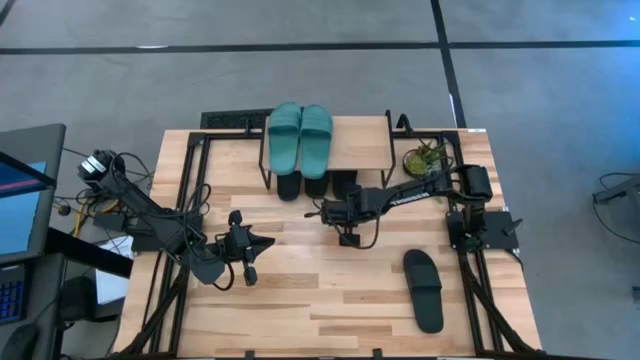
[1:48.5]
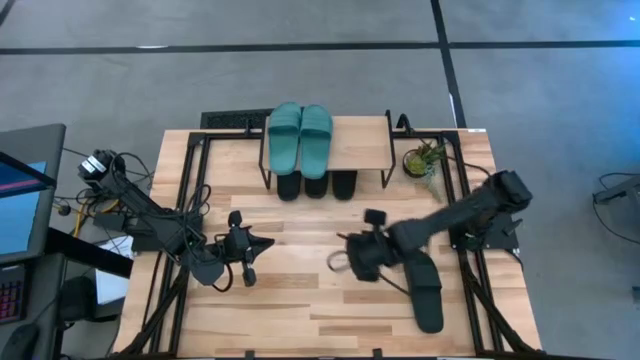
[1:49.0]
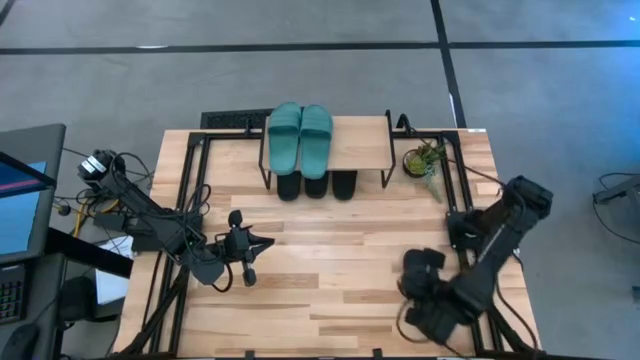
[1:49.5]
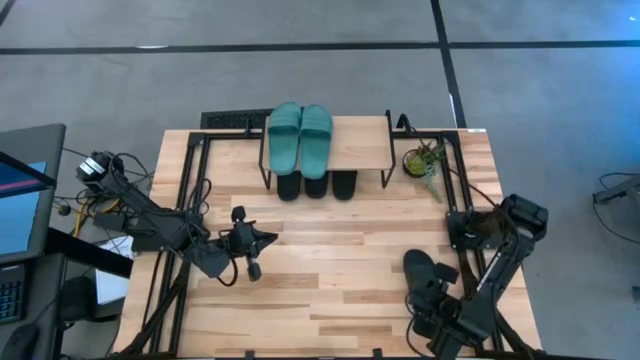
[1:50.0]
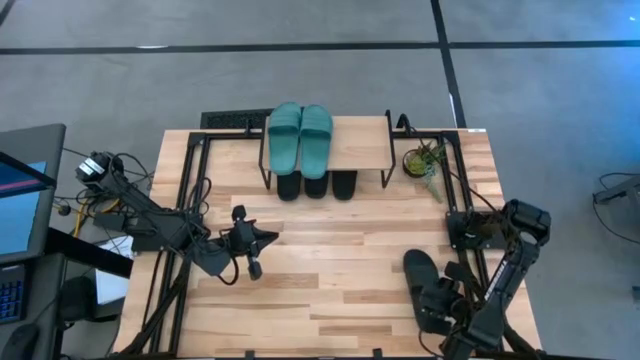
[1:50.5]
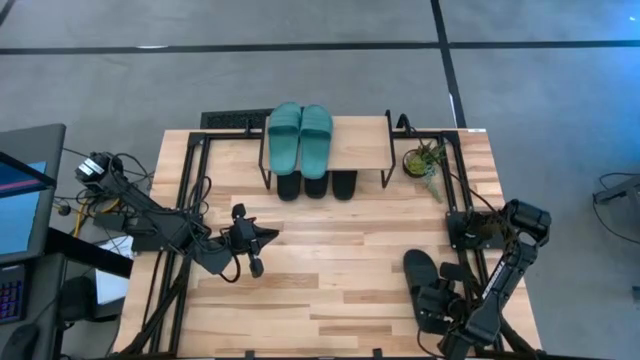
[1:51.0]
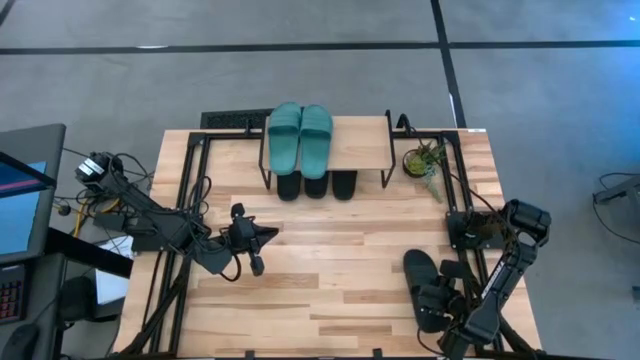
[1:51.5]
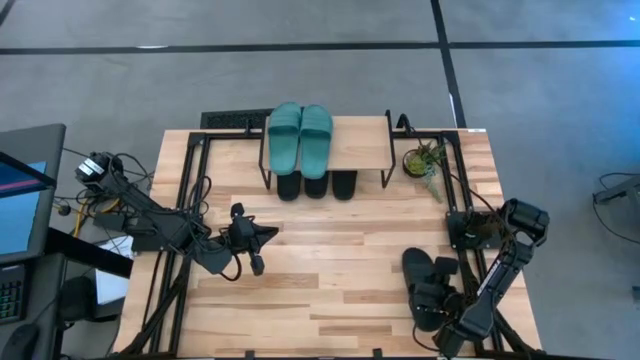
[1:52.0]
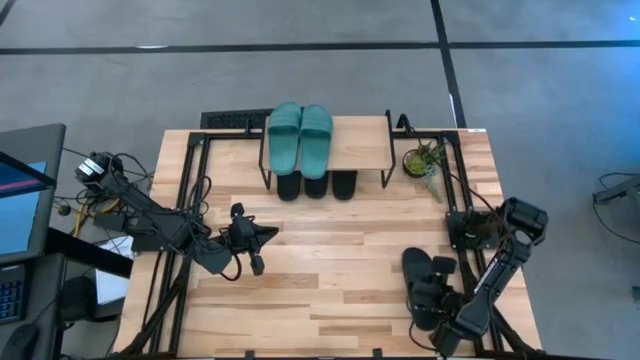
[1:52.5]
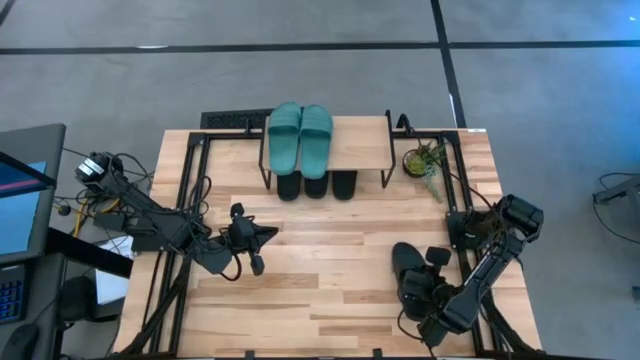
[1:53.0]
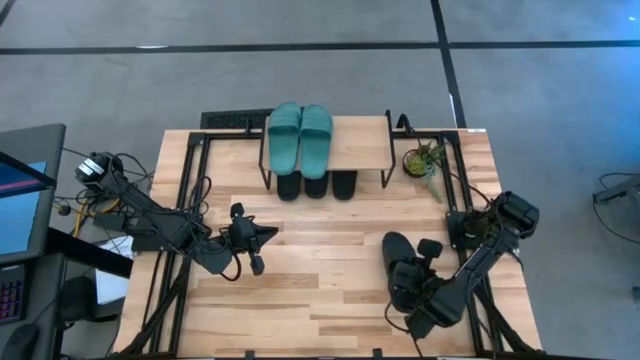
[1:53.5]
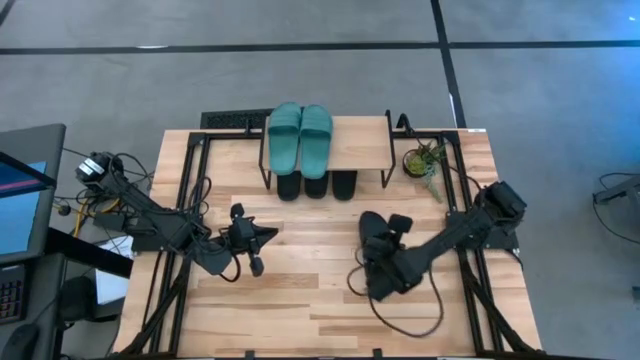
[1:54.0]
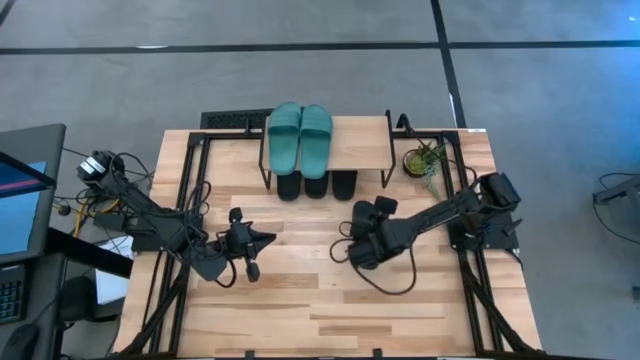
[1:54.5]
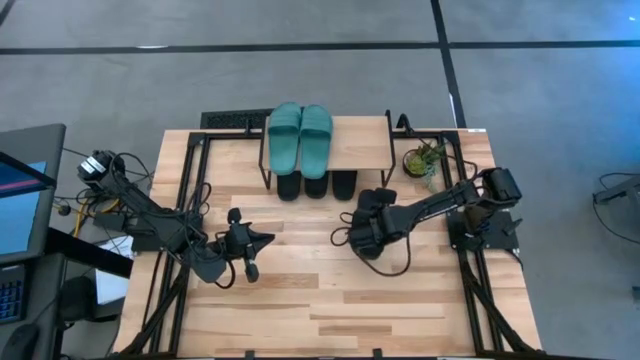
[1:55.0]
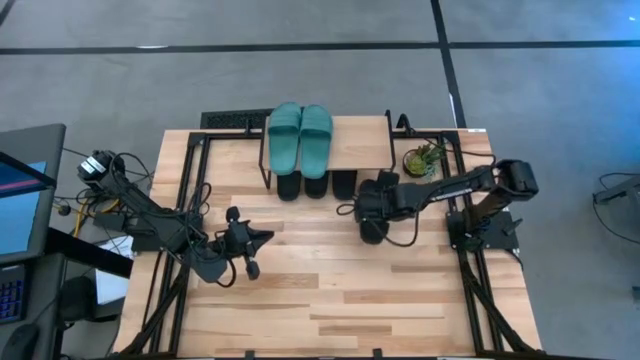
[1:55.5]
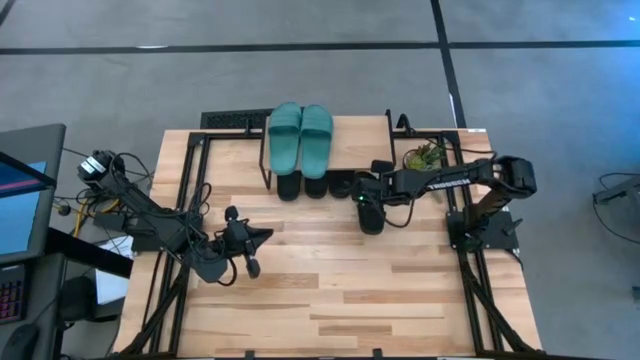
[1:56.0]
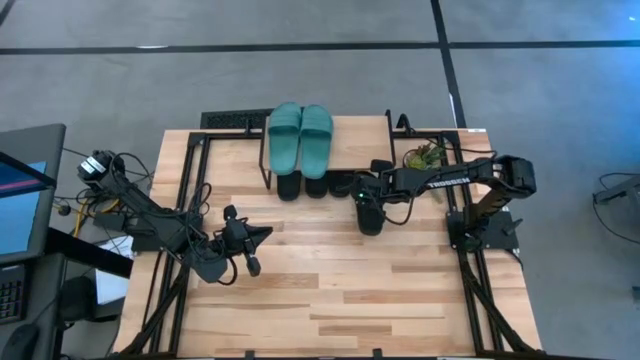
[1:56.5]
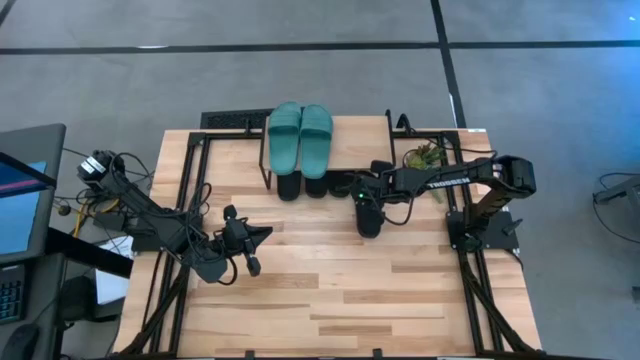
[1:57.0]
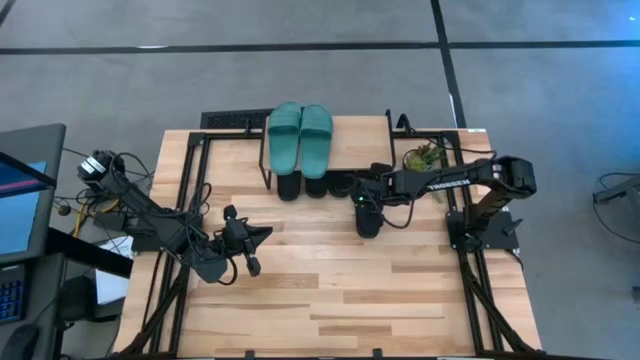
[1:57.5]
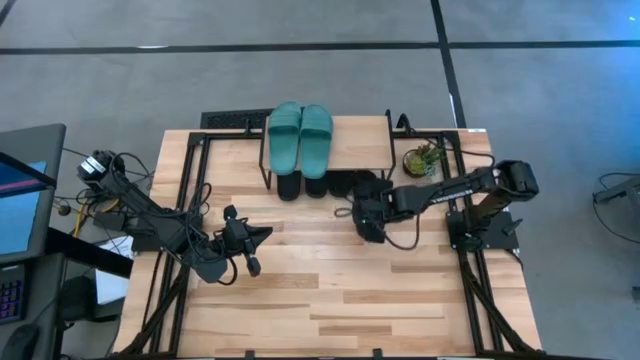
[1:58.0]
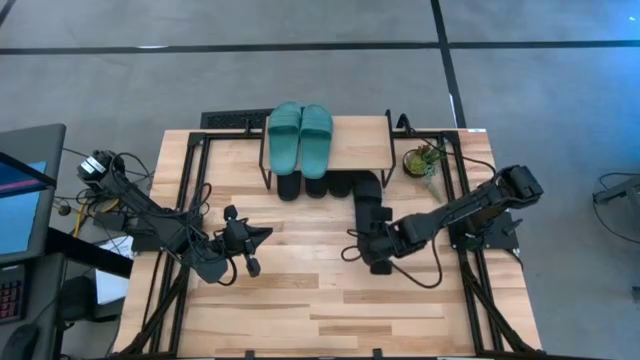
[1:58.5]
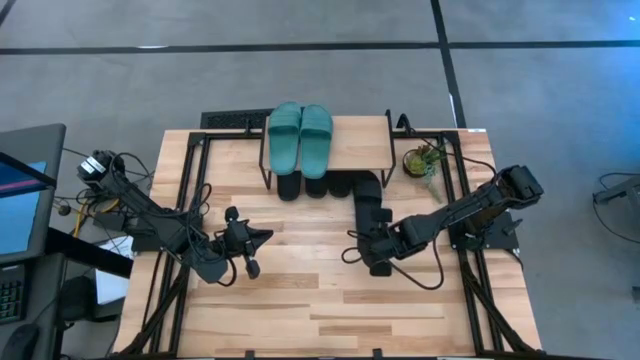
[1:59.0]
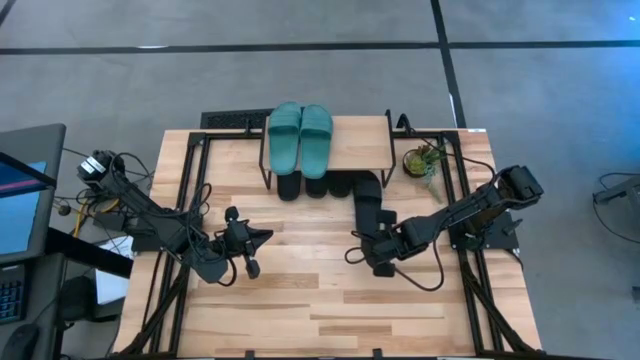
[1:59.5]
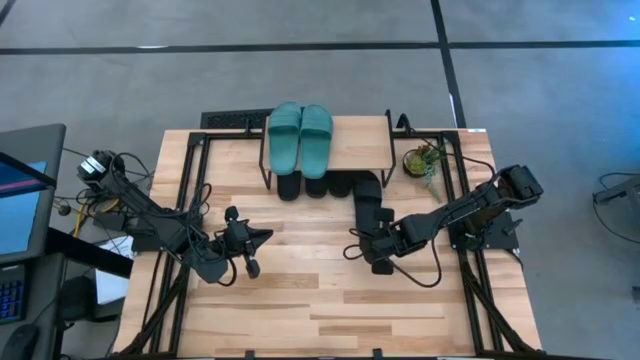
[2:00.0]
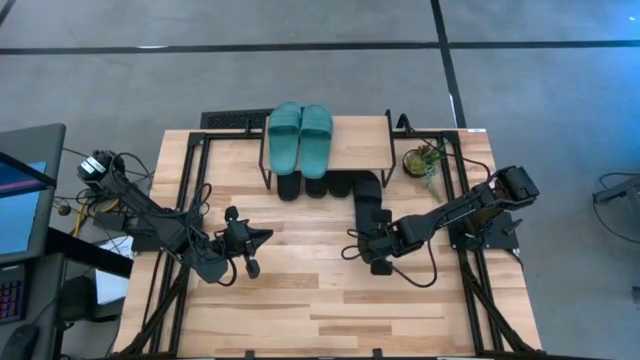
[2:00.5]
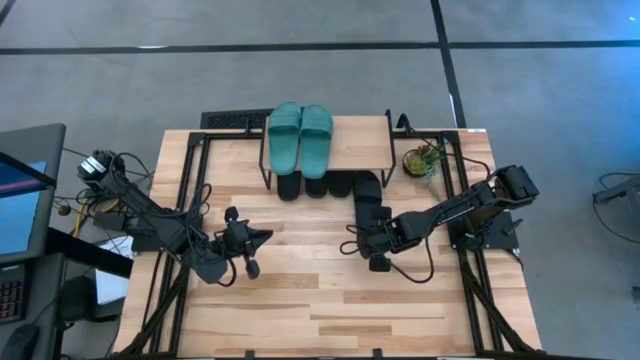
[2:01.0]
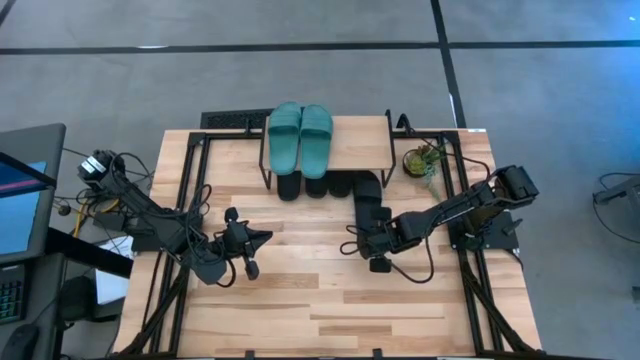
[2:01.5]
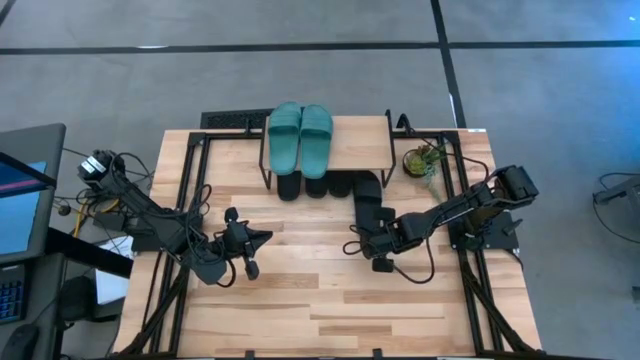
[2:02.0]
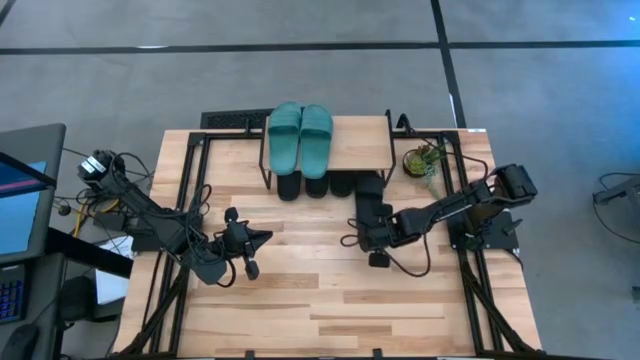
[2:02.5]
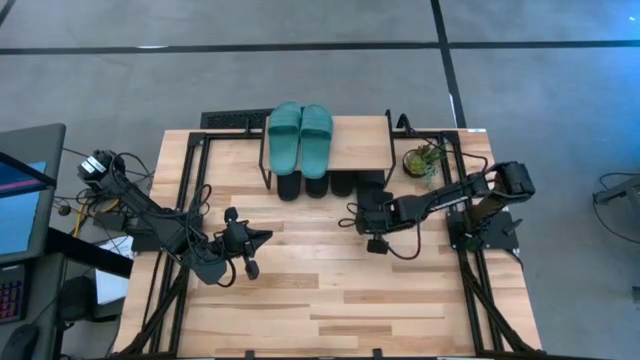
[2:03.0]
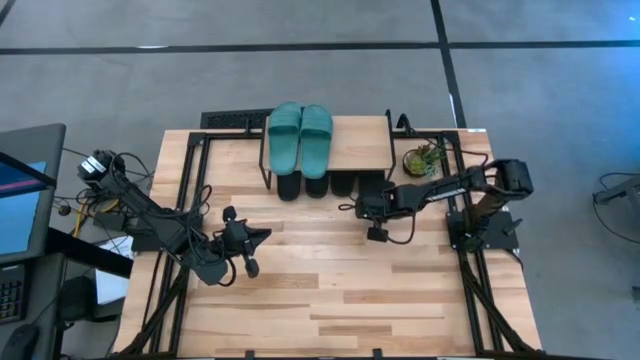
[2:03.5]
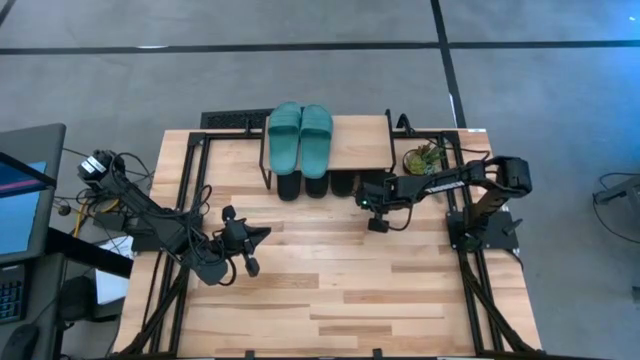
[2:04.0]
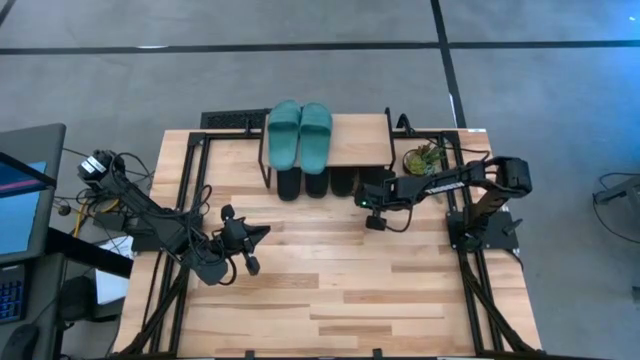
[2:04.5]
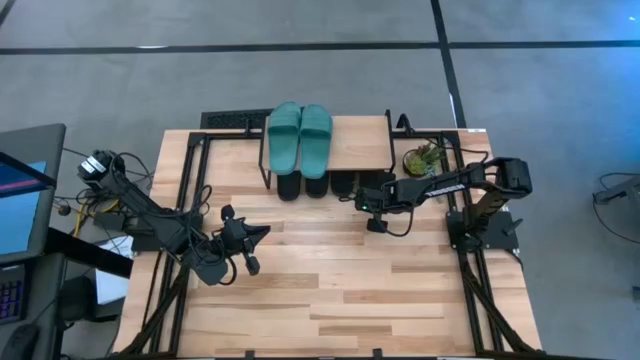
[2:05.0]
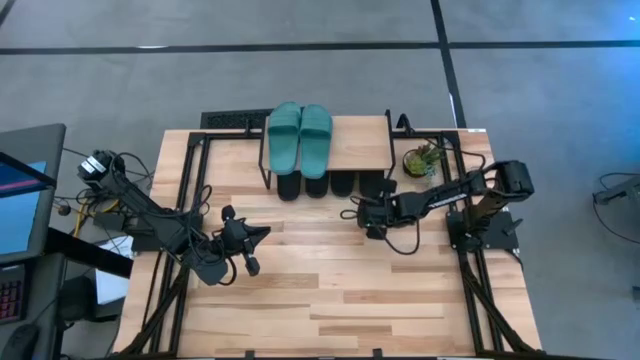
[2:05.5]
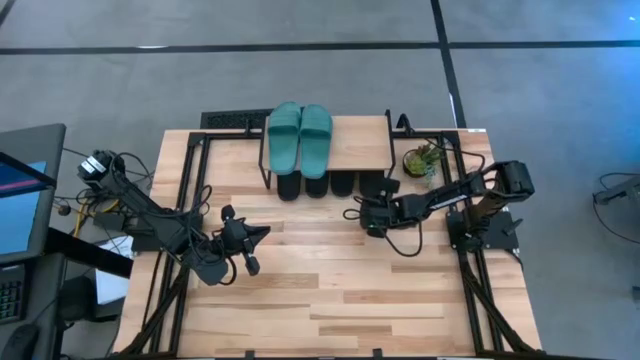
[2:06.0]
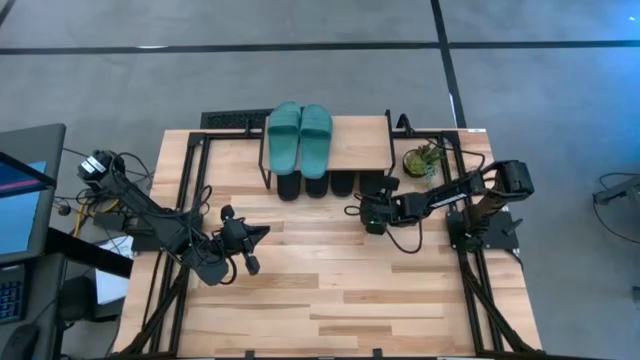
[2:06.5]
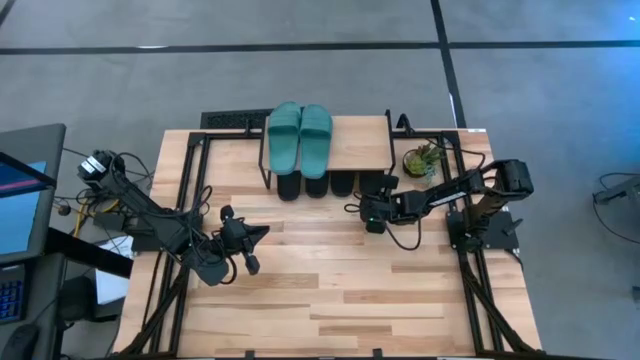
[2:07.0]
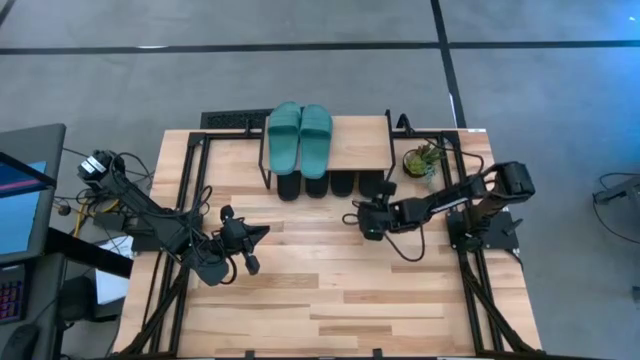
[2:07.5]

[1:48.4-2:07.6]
Task: Pick and place slides into the shelf
Put the black slide under the shelf

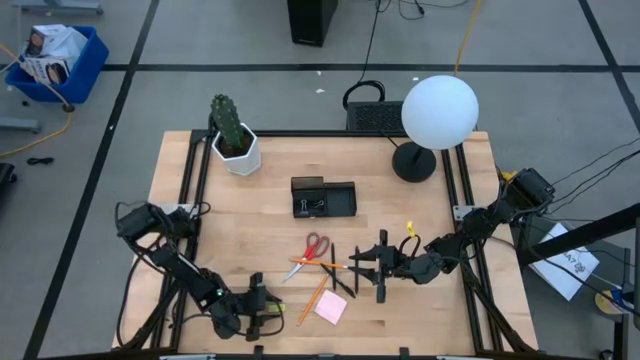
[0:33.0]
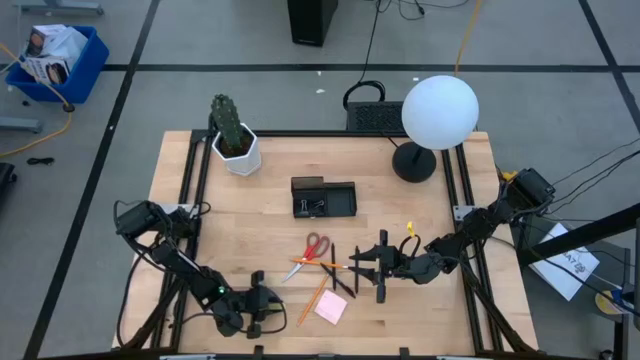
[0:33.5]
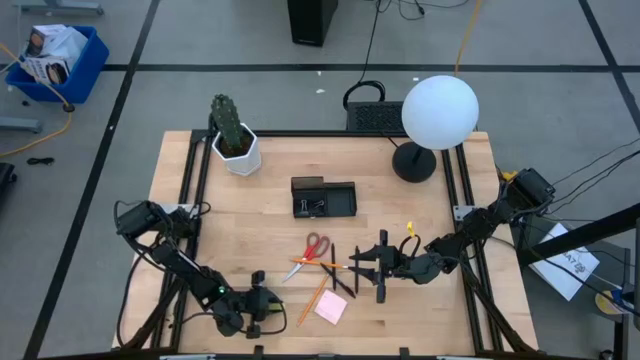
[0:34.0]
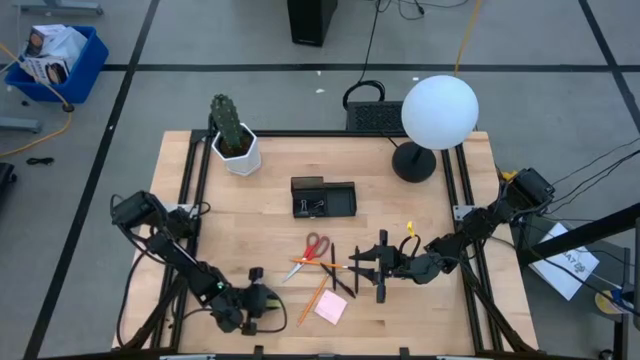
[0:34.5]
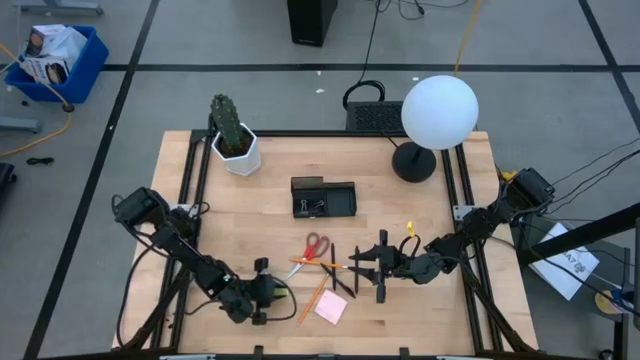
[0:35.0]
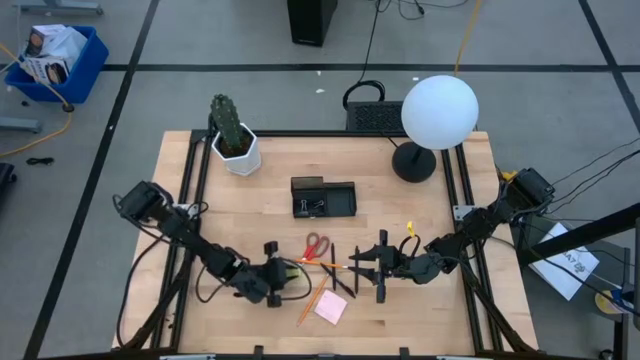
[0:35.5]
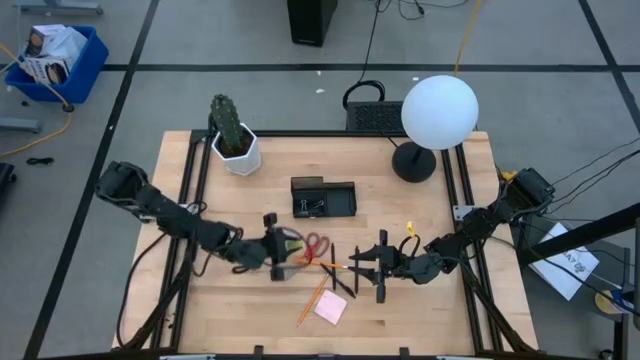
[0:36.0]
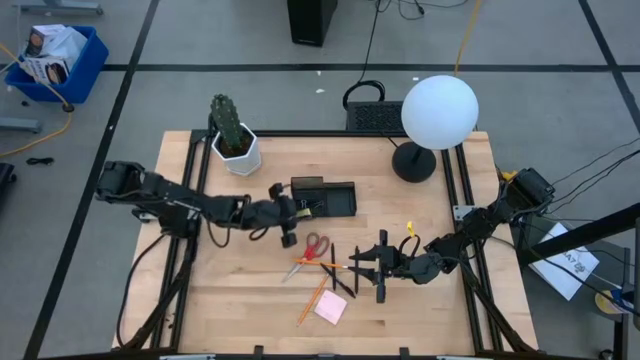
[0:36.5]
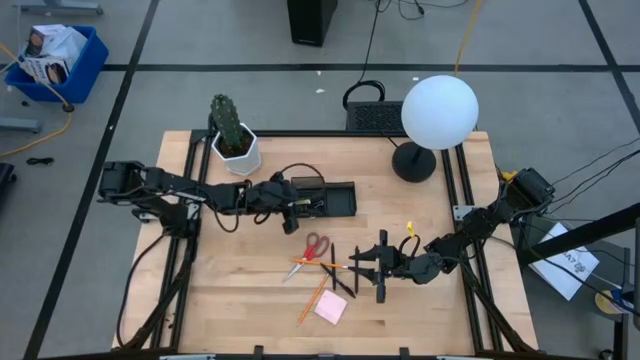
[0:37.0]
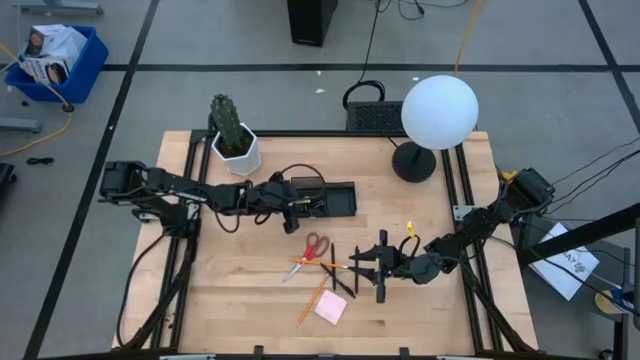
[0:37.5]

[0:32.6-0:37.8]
Task: Pick and place office supplies into organizer
Put the green eraser into the bottom left of the desk organizer
